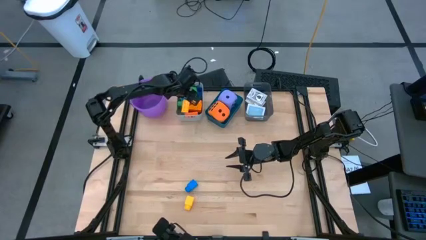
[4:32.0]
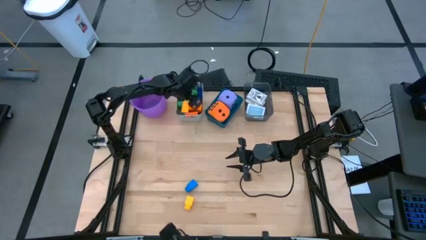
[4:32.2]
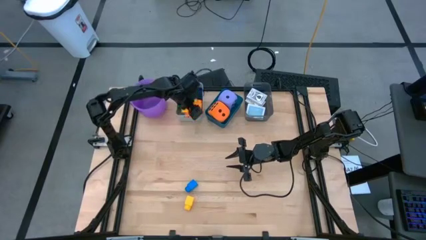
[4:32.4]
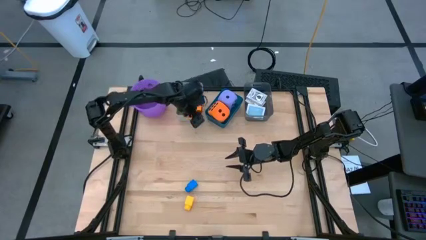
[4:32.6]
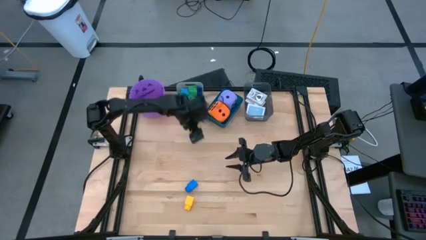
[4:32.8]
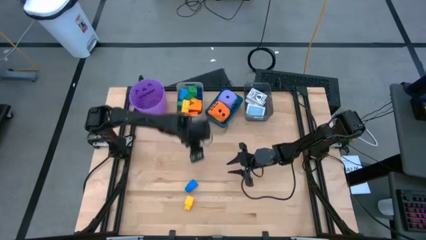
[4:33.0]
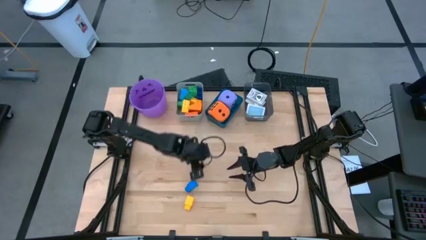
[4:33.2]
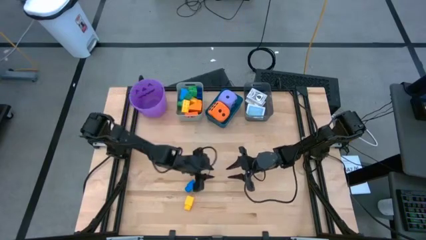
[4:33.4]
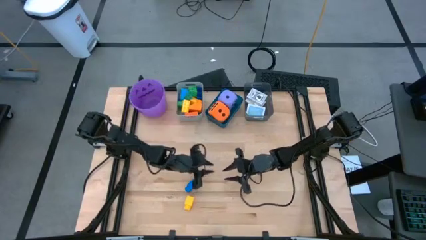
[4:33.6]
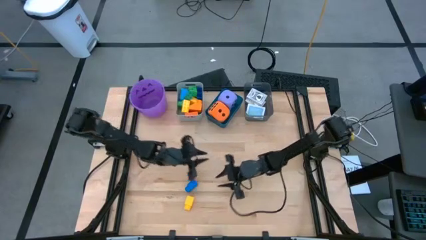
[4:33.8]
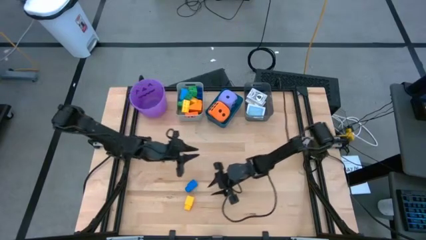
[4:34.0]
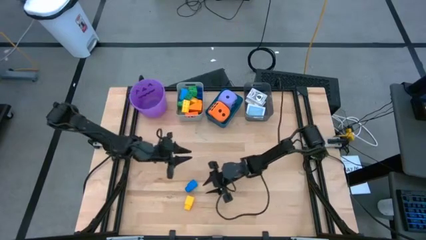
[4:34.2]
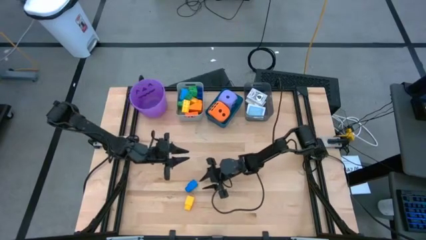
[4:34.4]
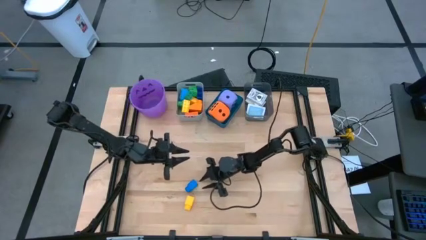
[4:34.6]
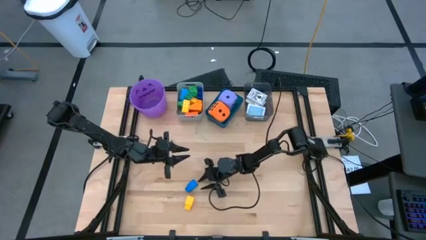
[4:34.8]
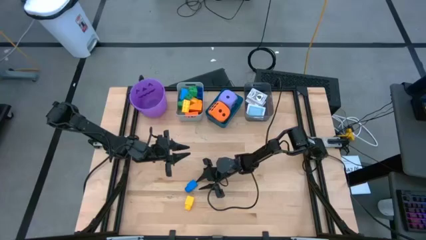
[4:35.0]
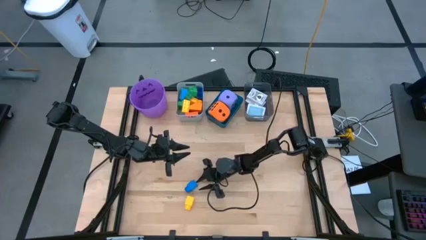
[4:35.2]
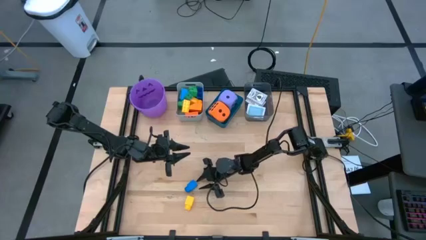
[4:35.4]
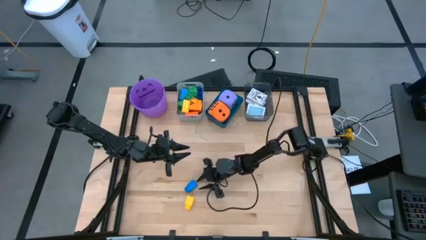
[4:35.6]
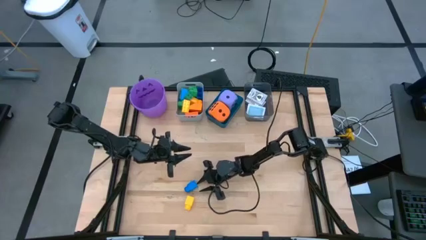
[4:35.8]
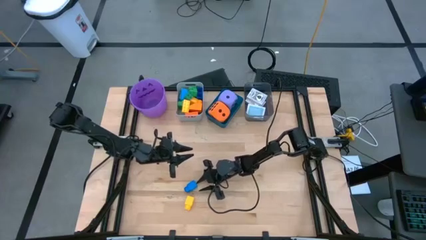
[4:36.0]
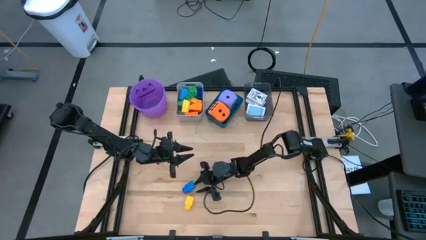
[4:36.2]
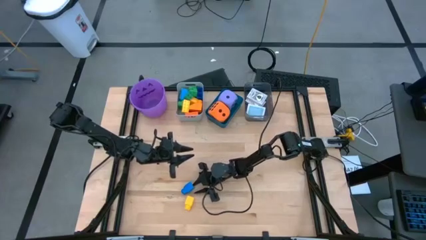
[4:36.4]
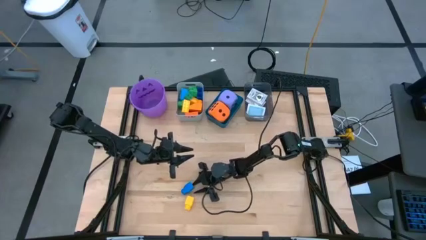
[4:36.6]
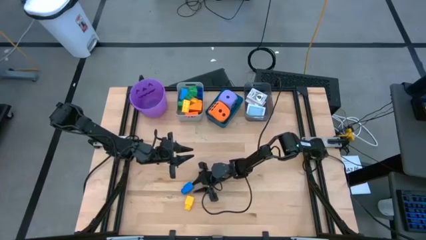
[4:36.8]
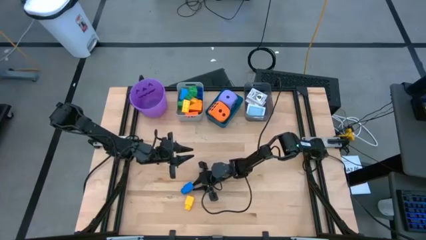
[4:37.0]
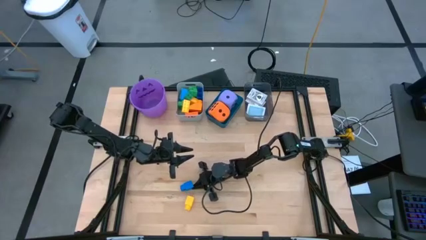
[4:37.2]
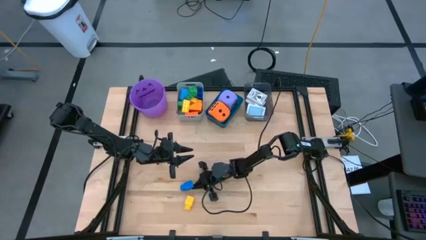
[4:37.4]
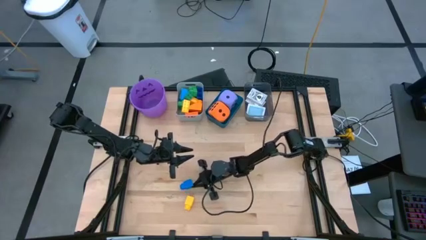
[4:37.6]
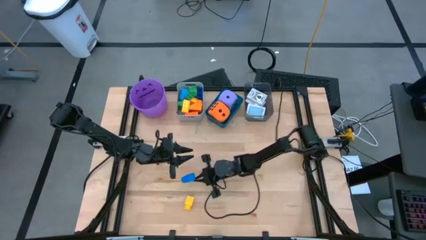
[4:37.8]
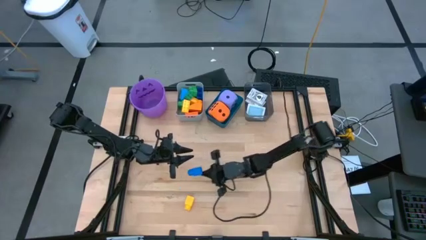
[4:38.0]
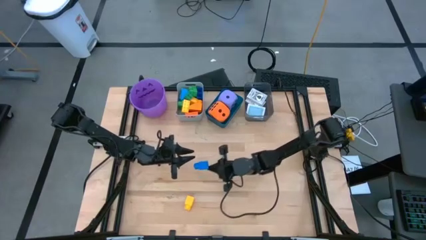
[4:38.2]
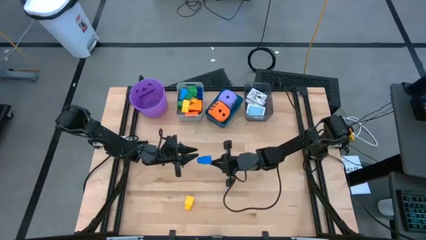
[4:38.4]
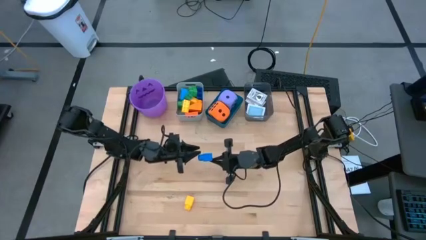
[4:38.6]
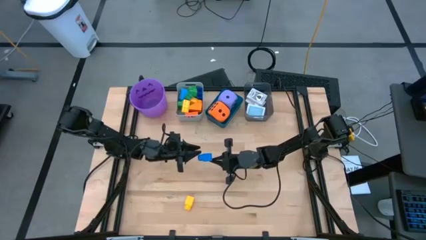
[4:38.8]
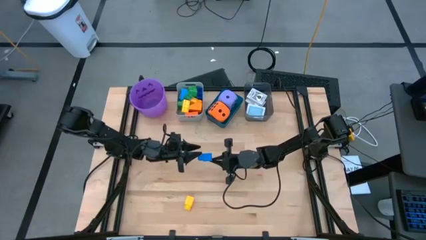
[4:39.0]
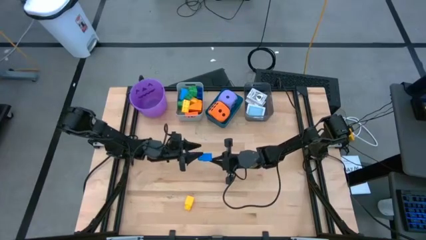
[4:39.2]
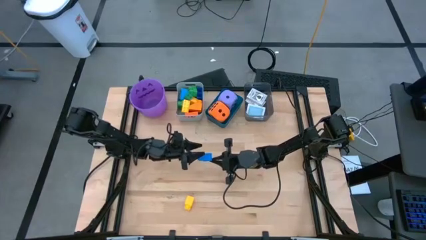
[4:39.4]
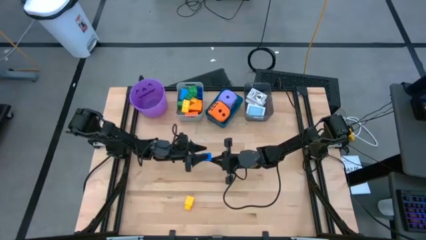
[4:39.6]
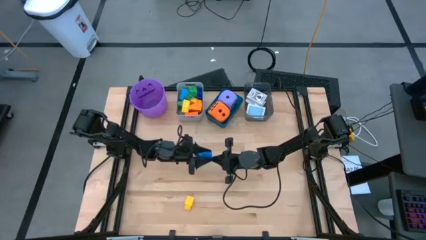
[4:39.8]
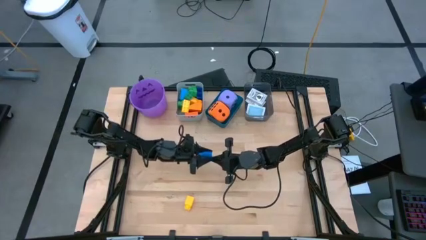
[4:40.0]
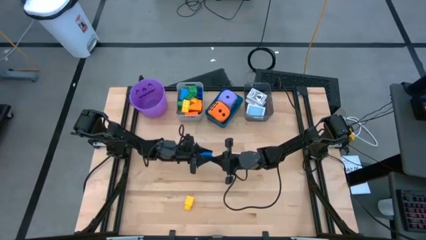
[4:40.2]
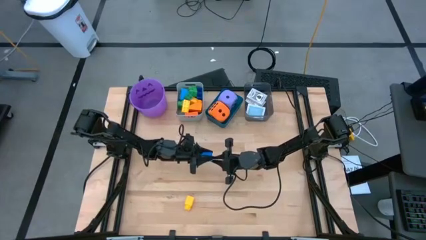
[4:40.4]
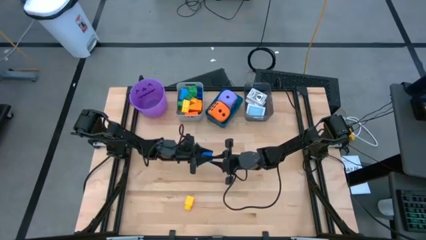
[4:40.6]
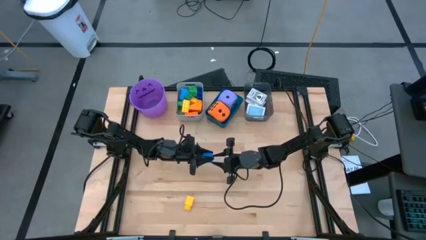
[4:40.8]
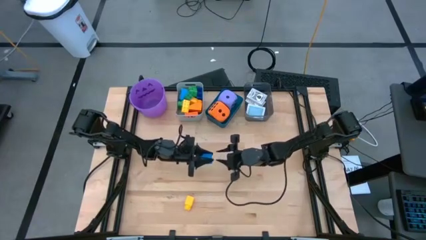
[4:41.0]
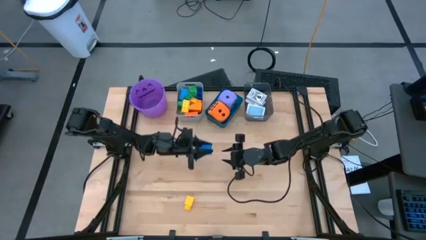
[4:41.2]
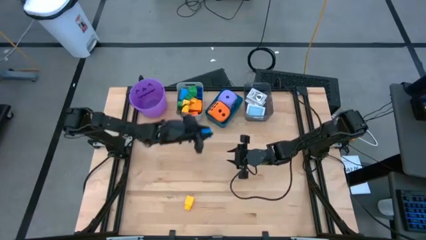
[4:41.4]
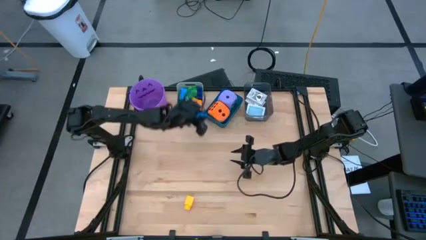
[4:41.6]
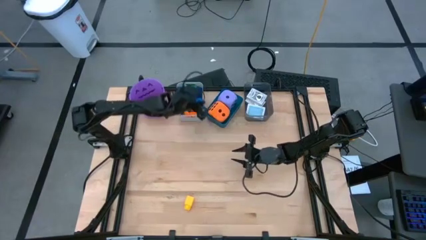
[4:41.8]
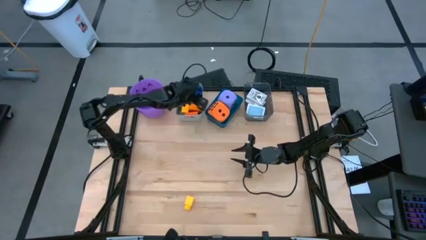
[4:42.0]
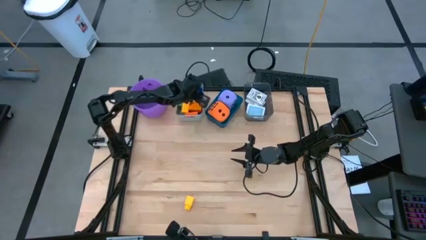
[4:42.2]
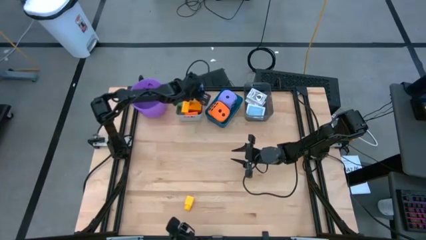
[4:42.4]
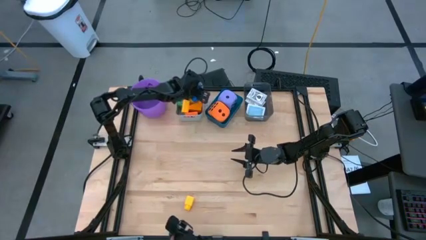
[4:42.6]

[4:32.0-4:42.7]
Task: Pick & Place Toys
Put the blue game piece into the gray bin

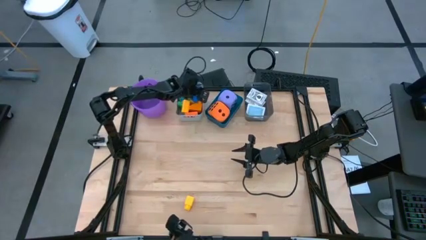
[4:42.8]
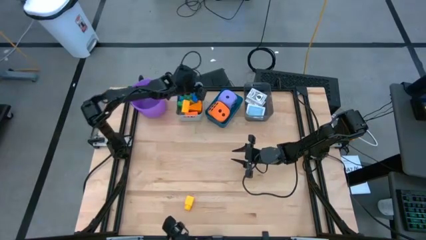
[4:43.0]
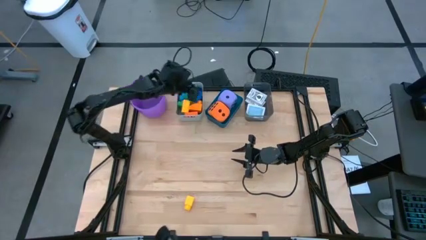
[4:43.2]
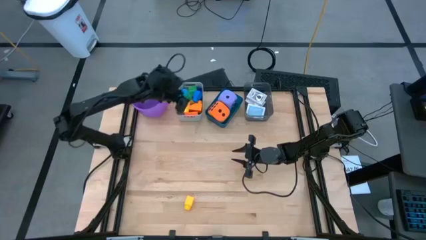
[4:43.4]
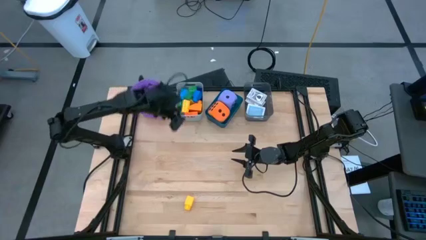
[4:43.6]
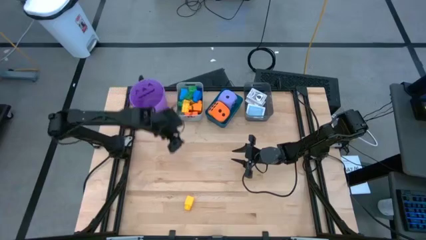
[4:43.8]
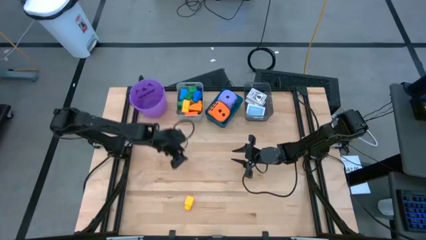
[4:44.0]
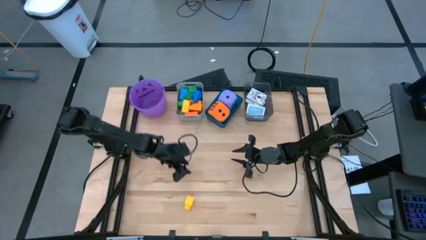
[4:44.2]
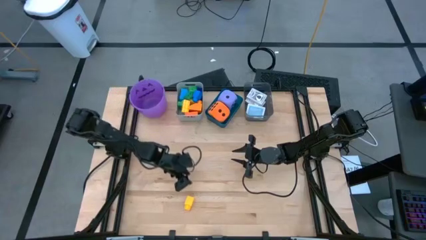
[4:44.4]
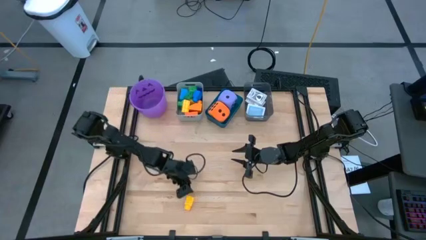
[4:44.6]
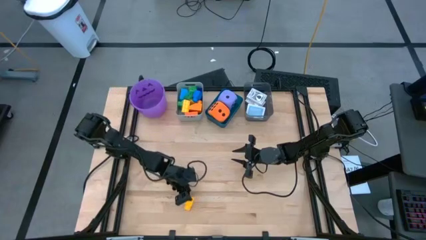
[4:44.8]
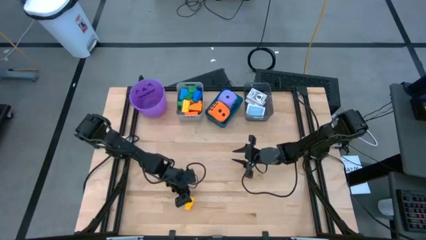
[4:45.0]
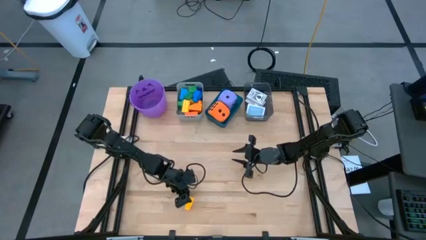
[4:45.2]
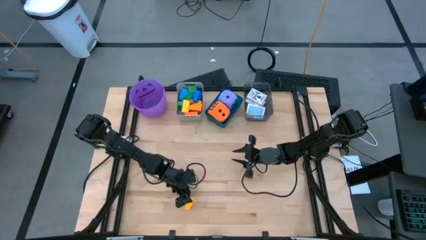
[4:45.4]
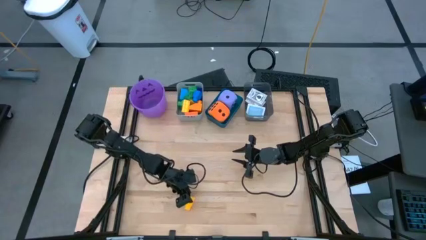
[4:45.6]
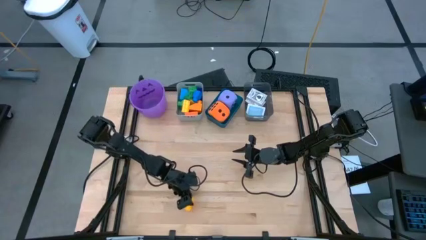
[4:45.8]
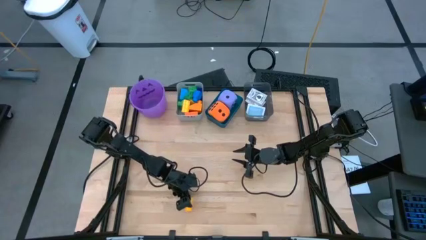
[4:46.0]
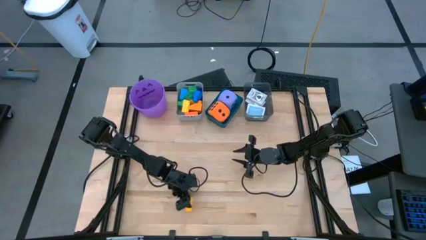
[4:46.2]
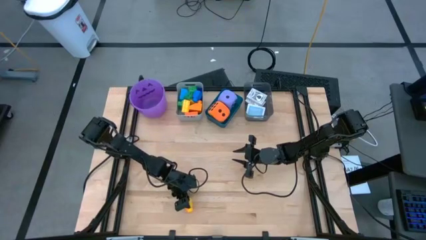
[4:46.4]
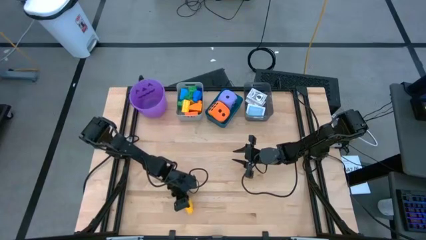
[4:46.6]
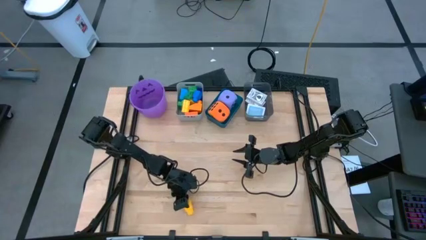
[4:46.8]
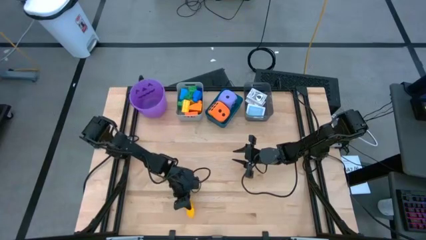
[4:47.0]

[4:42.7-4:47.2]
Put the yellow game piece into the gray bin

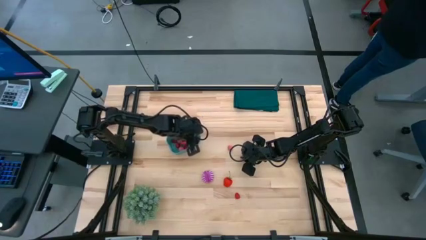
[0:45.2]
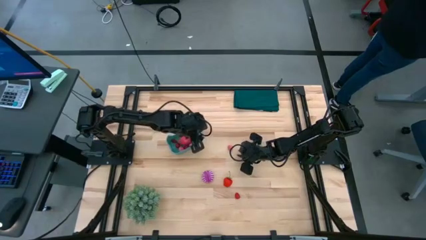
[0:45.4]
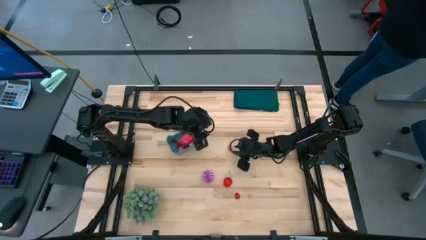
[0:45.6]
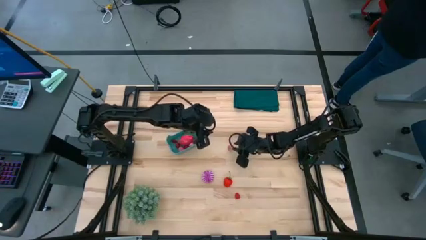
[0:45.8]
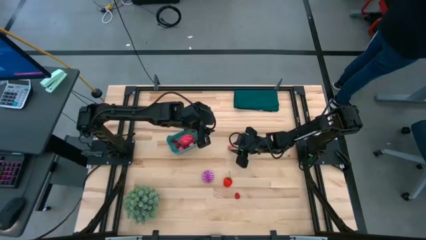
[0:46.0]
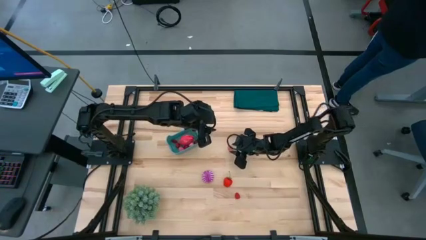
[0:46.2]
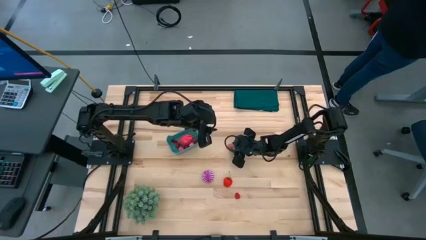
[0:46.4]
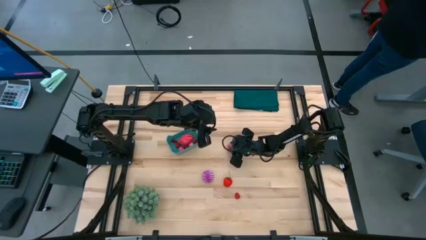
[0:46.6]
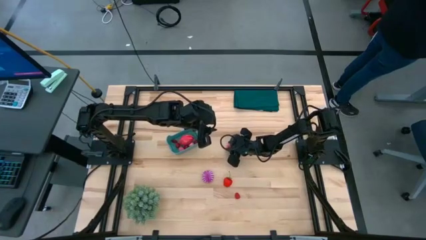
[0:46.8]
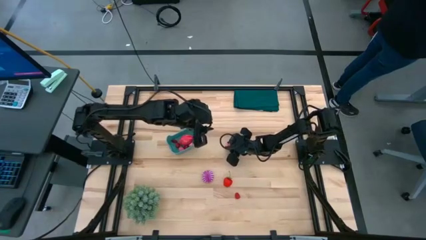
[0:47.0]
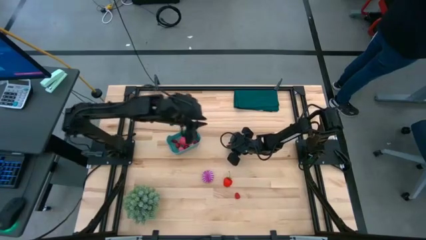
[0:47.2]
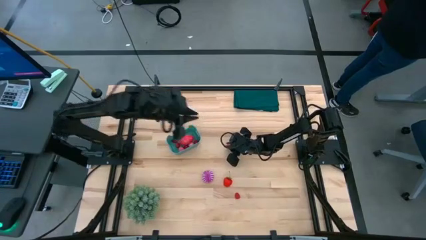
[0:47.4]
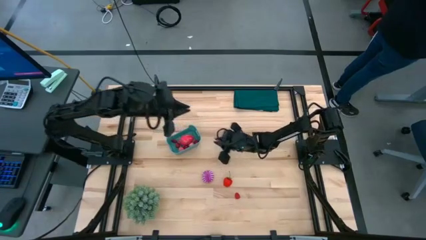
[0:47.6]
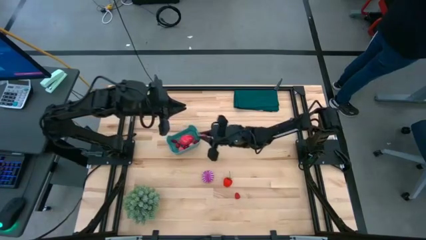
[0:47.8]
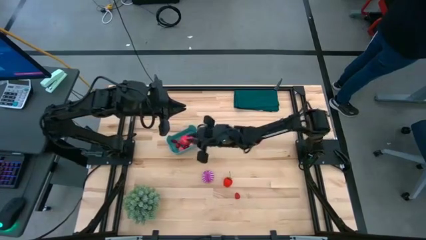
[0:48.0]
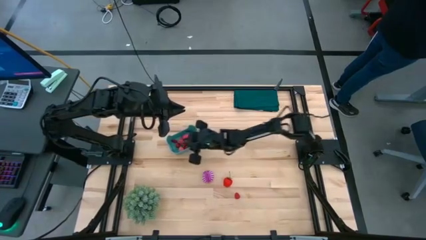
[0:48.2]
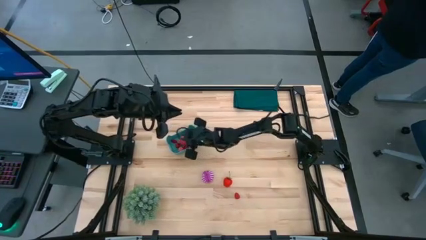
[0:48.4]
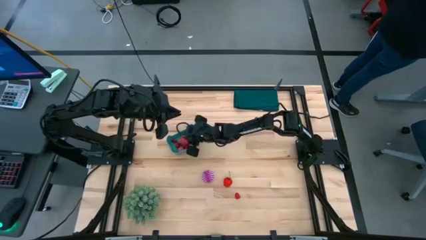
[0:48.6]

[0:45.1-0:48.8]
Task: Pick and placing Produce into tupperware
Put the pink peach into the blue bin
